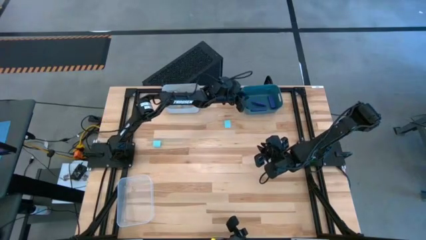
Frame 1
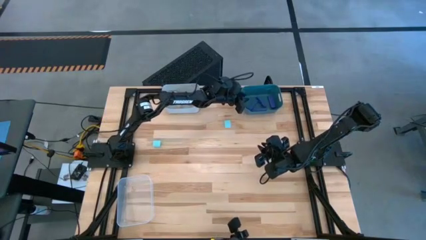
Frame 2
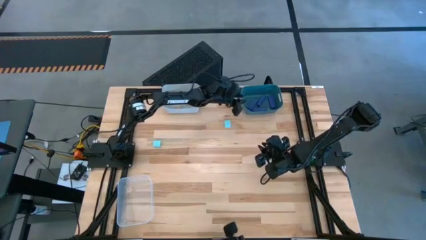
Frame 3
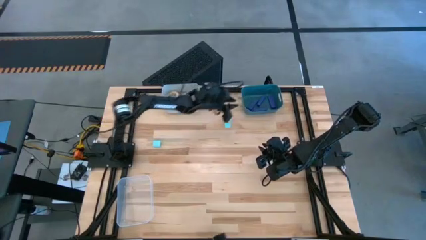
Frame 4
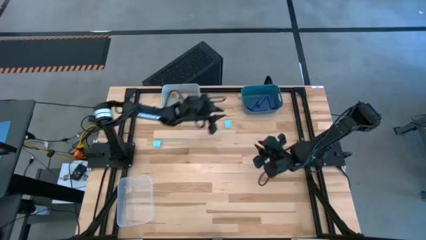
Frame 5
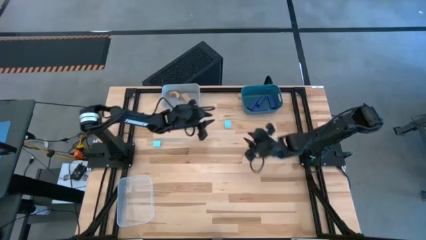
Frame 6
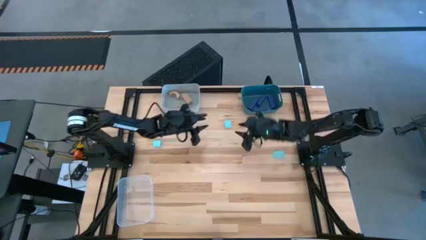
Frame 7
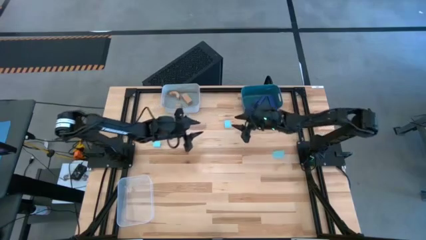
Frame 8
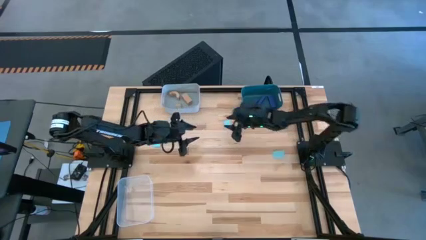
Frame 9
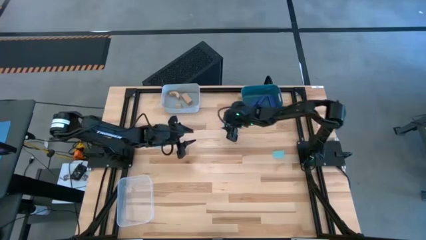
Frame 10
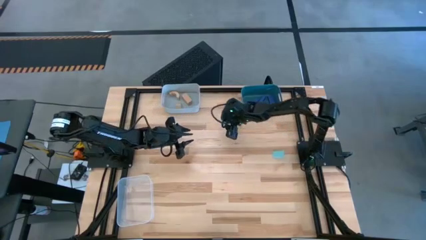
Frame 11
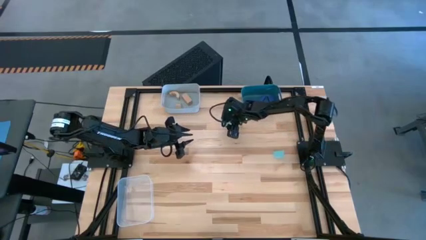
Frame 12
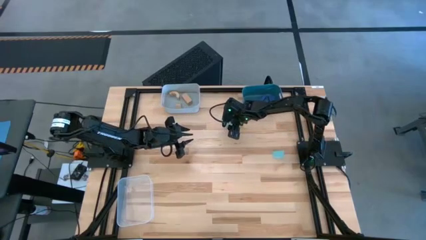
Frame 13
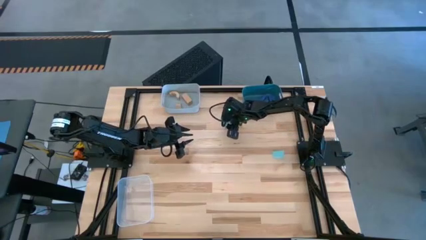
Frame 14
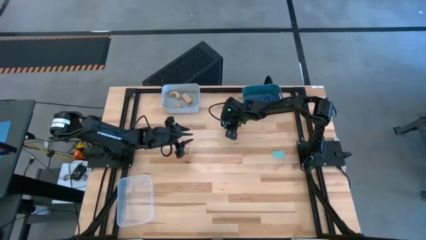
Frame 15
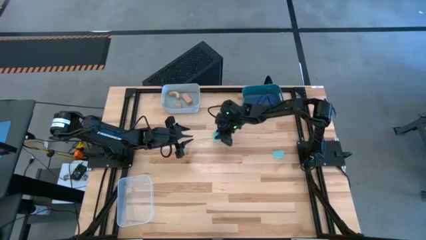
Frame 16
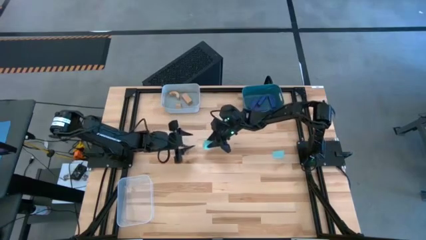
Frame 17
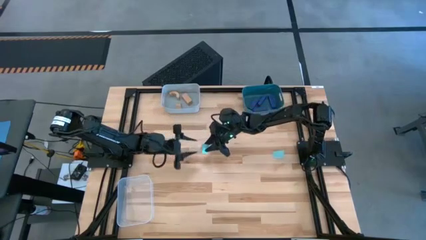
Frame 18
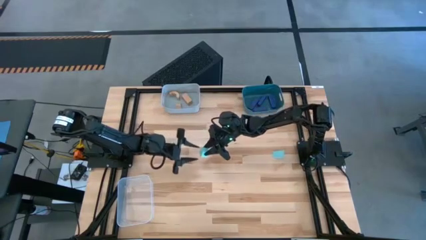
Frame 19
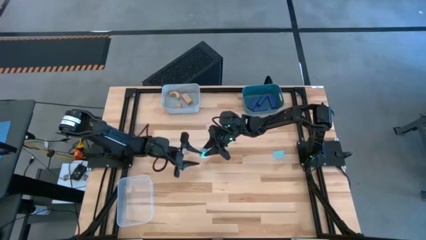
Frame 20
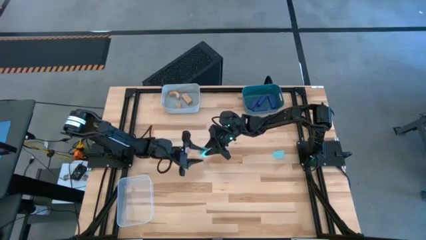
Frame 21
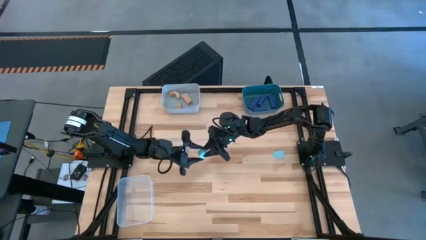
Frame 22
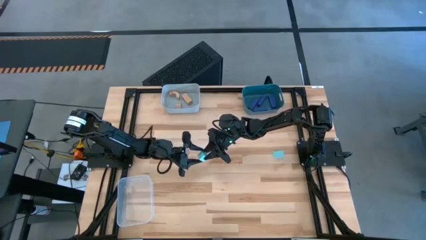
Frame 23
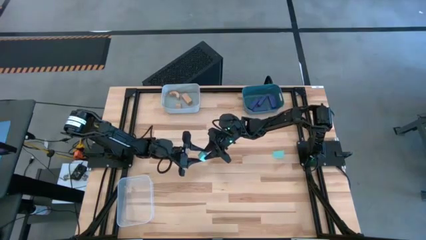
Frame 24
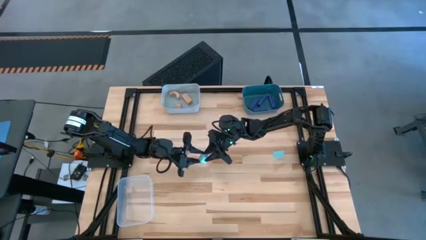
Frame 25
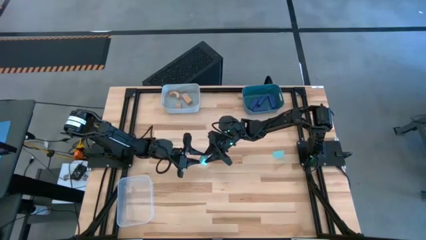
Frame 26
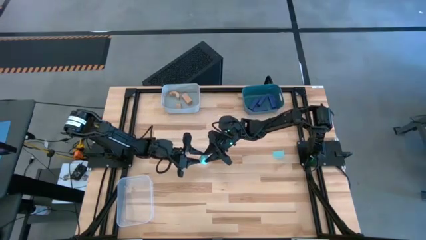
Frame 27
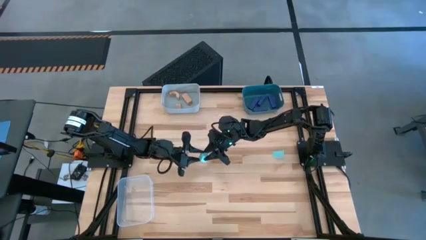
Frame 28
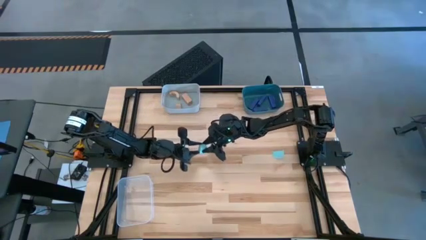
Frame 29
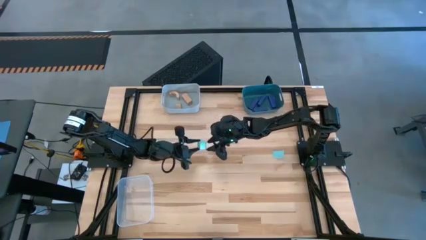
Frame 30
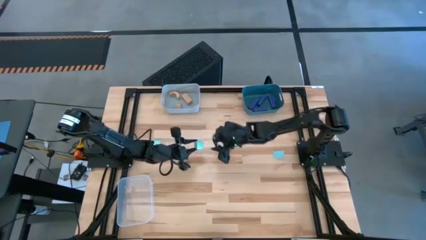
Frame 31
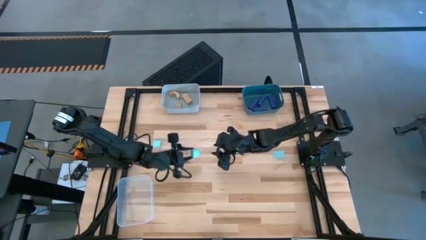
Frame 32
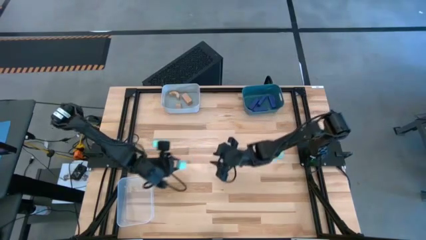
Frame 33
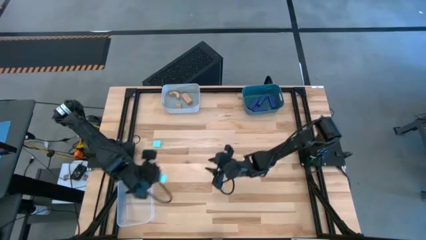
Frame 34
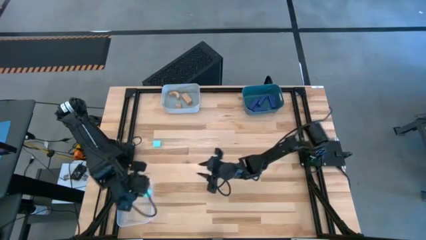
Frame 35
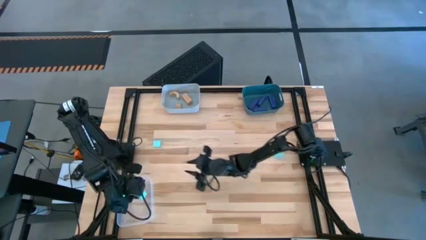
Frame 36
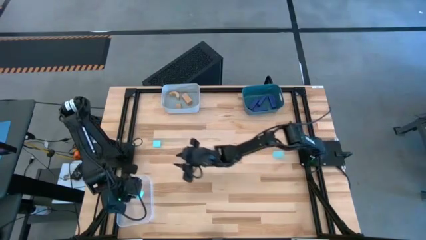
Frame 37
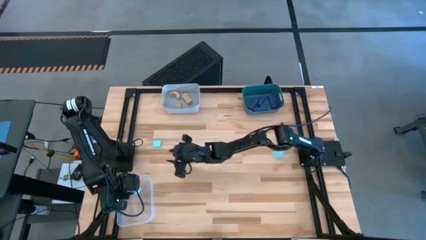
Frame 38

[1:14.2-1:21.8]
Task: Sort & place blocks by color
Put the light blue block into the transparent bin

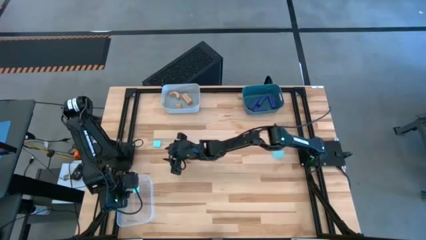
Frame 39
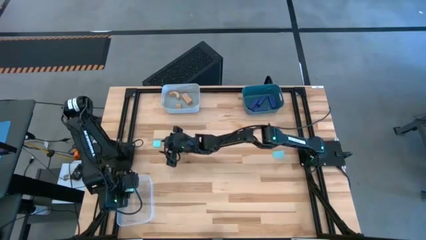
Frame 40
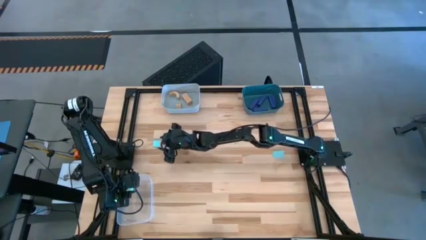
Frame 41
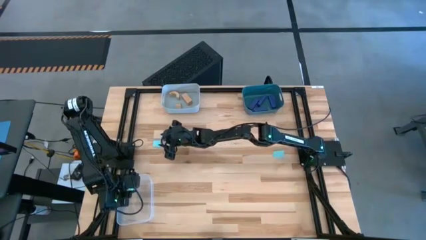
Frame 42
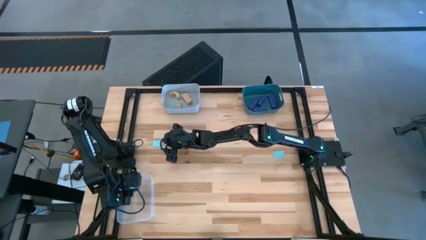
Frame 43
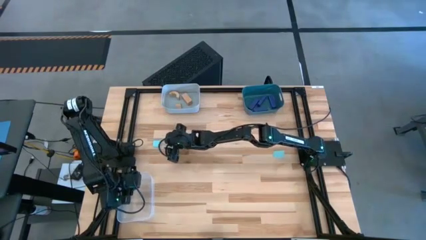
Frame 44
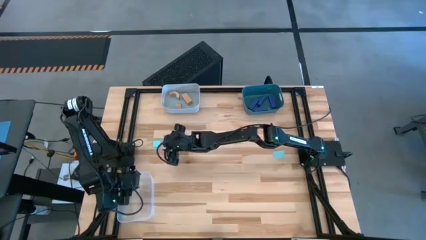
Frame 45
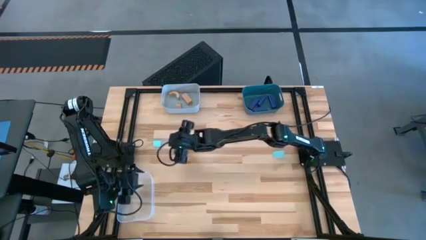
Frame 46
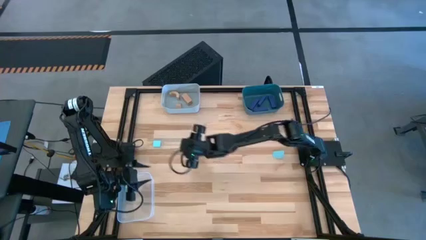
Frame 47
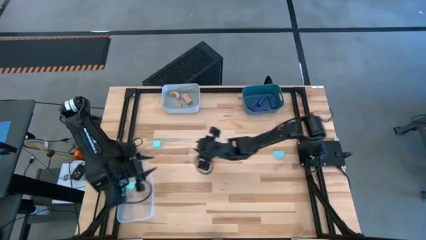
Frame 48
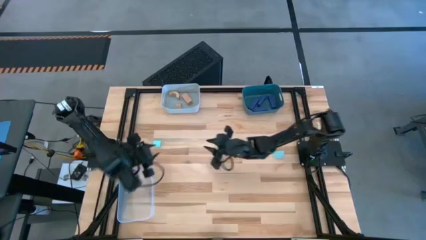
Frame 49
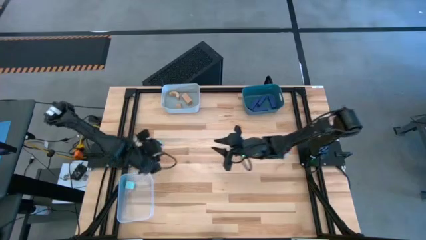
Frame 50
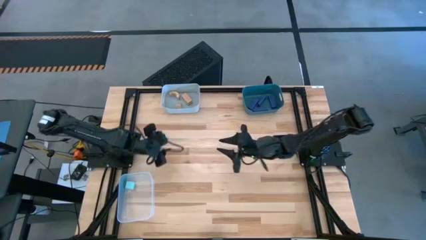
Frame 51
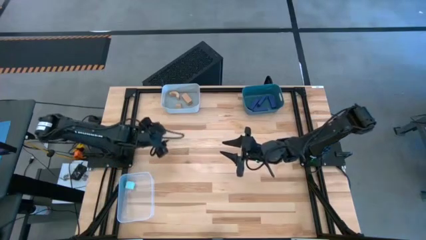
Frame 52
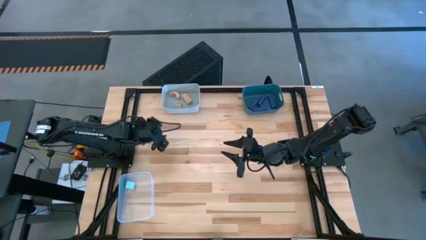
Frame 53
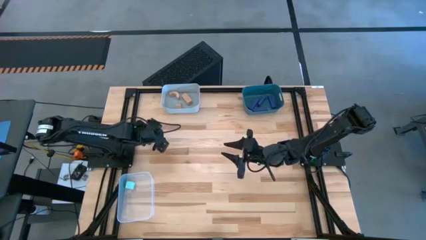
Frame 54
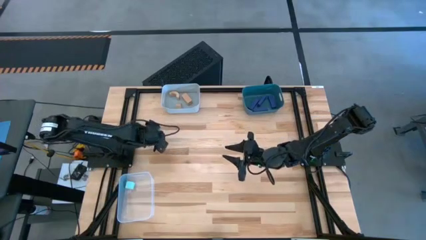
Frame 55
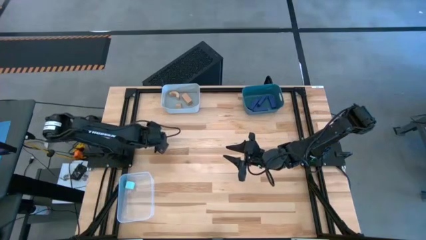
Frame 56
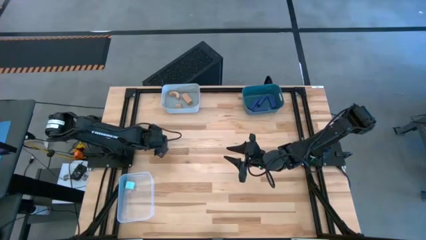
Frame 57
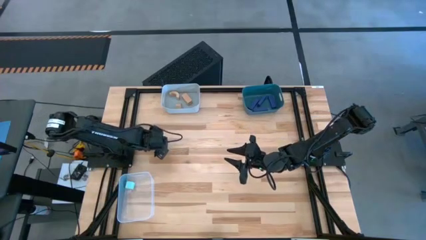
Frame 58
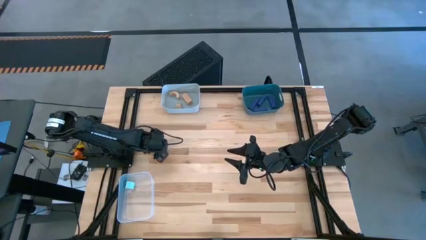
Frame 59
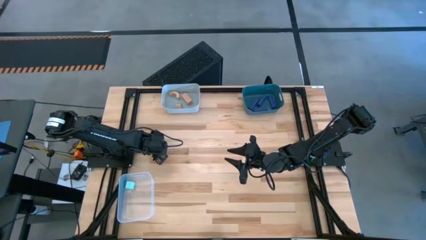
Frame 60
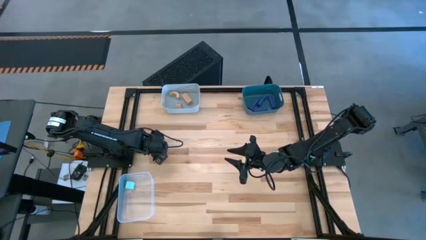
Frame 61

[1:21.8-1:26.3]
Put the light blue block into the transparent bin

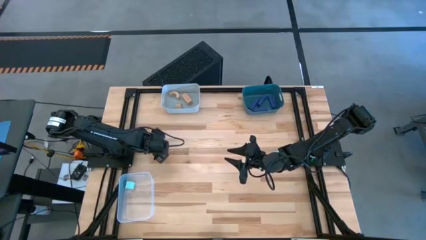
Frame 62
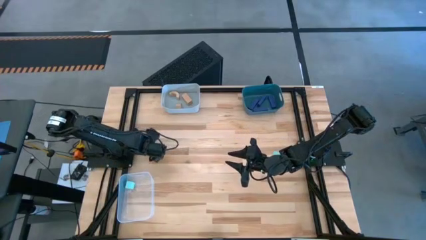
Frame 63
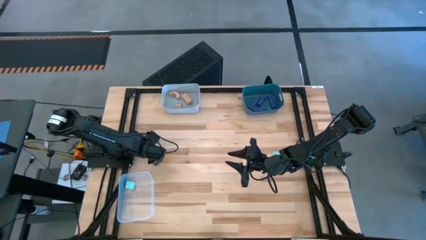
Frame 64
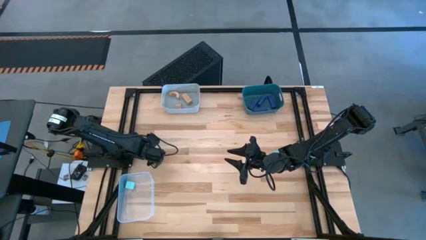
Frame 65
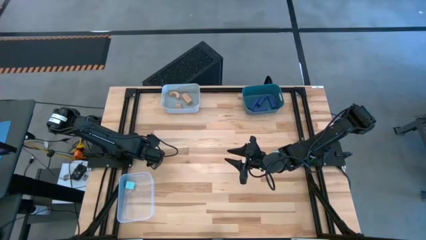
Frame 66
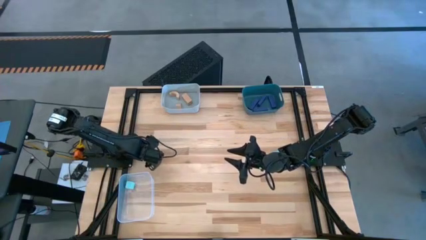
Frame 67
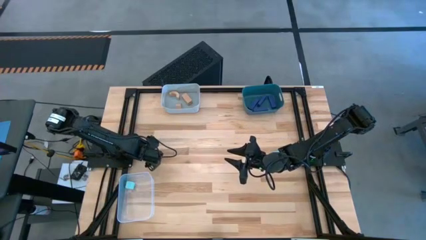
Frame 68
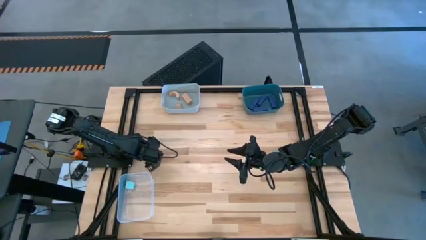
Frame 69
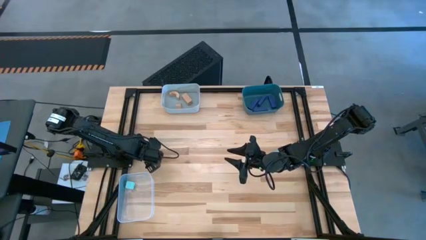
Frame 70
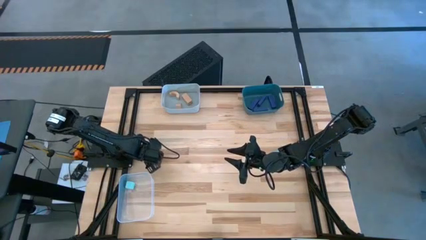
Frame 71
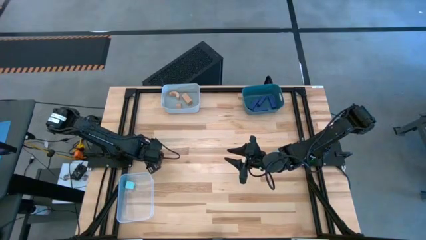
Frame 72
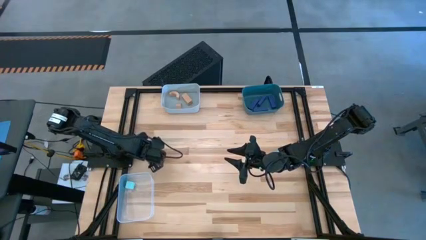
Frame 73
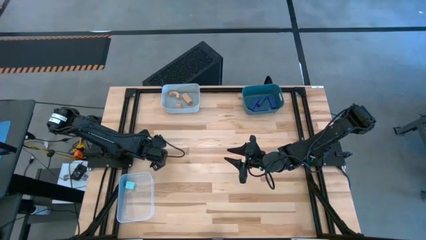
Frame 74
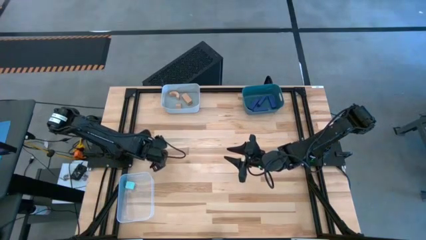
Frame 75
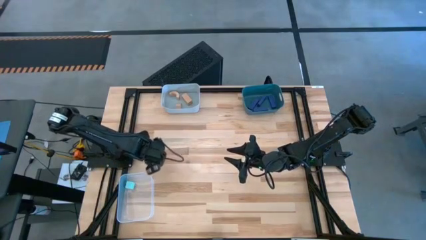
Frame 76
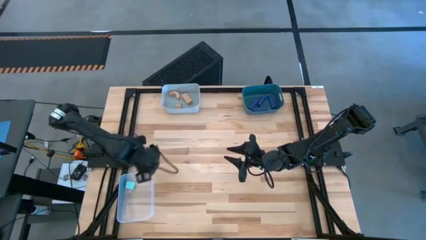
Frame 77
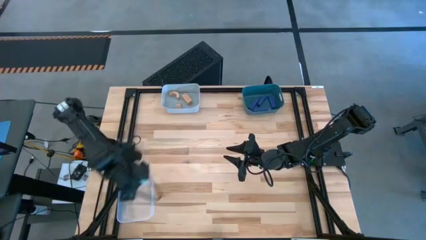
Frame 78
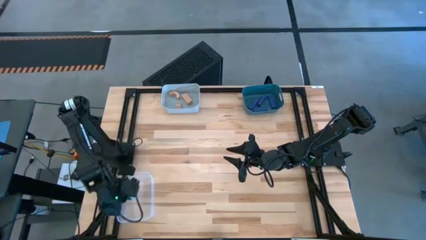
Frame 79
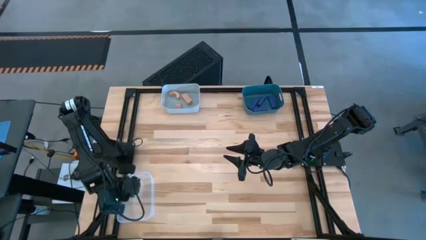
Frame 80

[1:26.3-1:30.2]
Put the light blue block into the transparent bin
